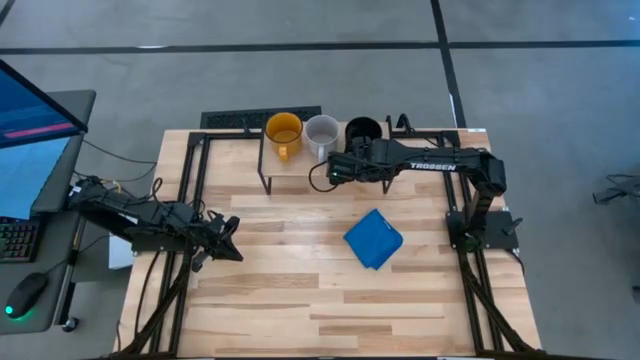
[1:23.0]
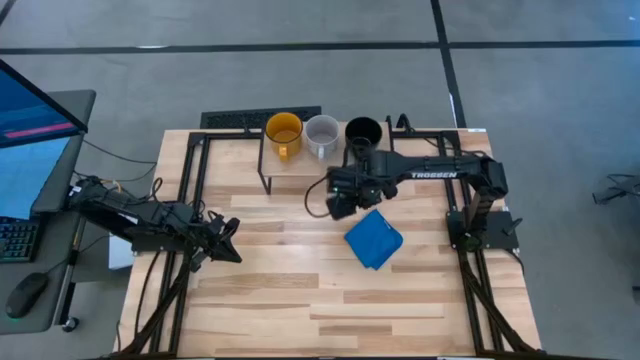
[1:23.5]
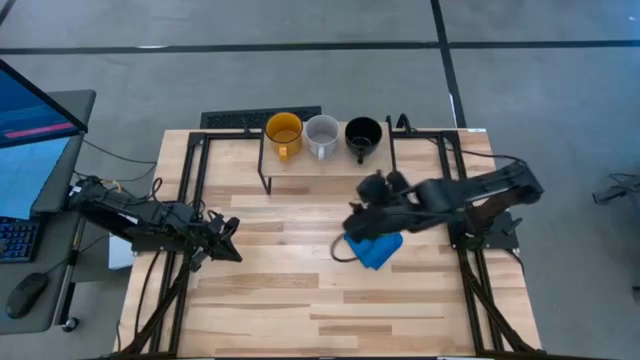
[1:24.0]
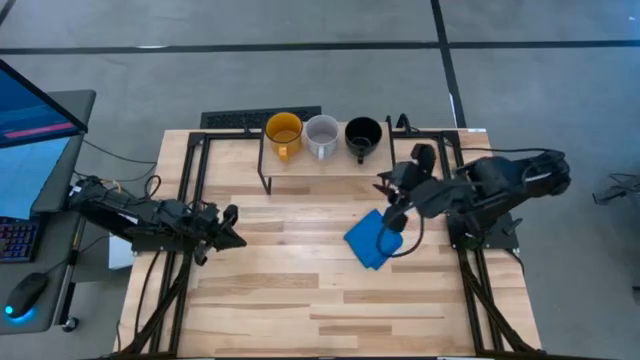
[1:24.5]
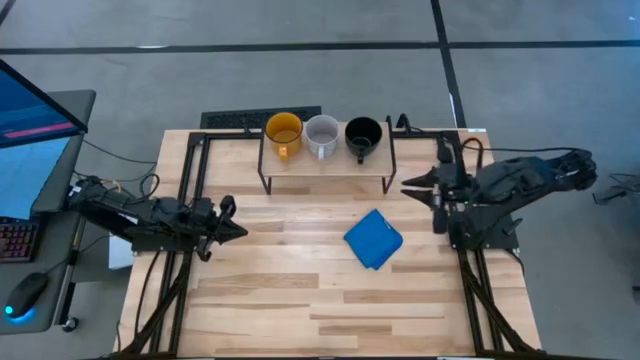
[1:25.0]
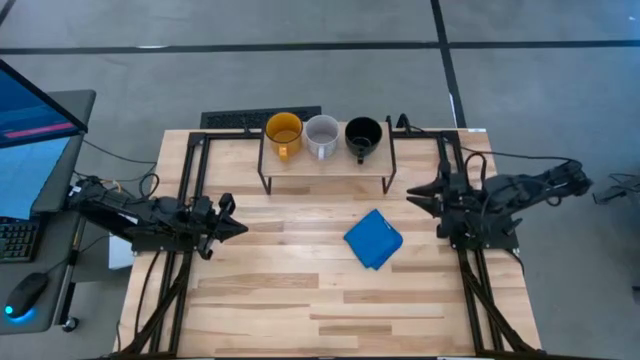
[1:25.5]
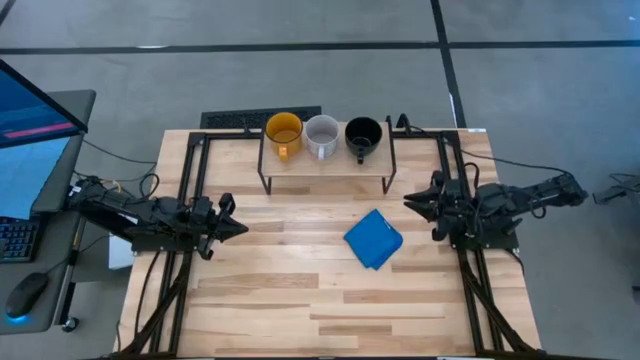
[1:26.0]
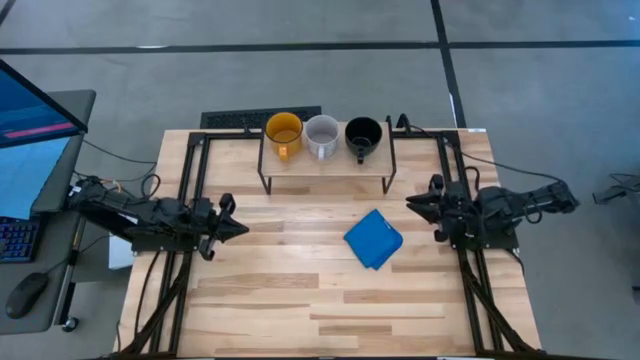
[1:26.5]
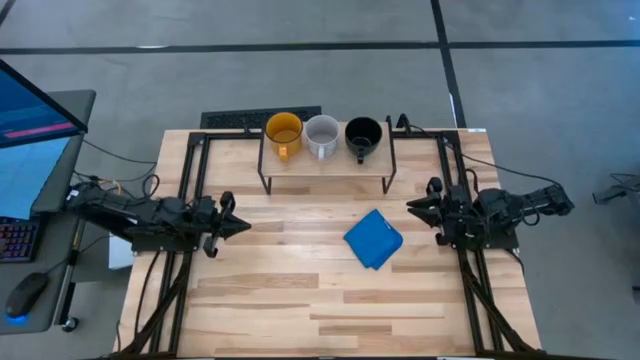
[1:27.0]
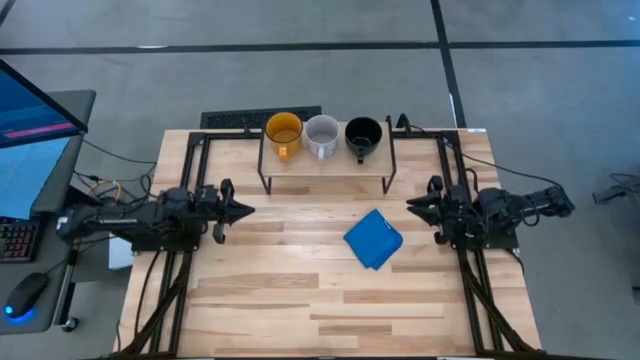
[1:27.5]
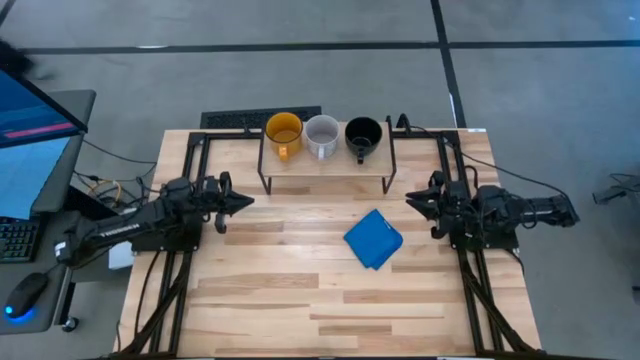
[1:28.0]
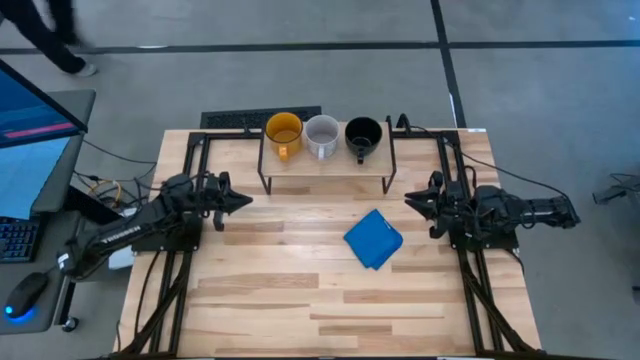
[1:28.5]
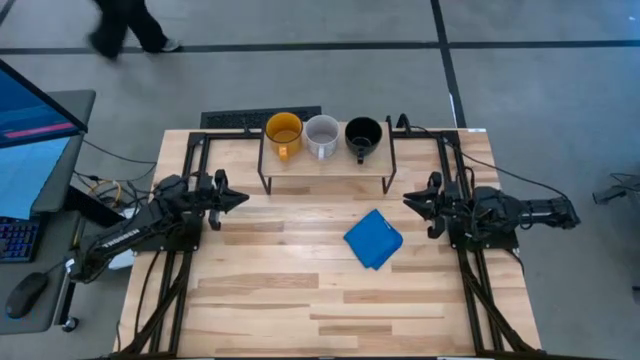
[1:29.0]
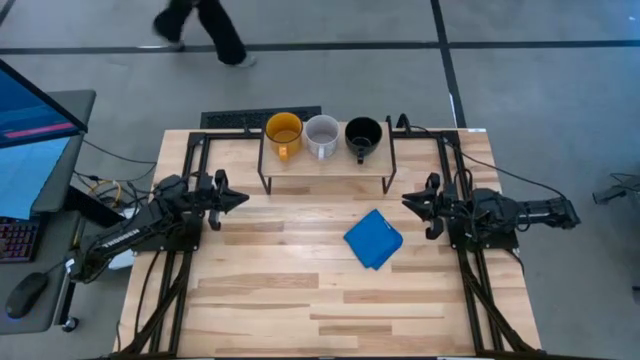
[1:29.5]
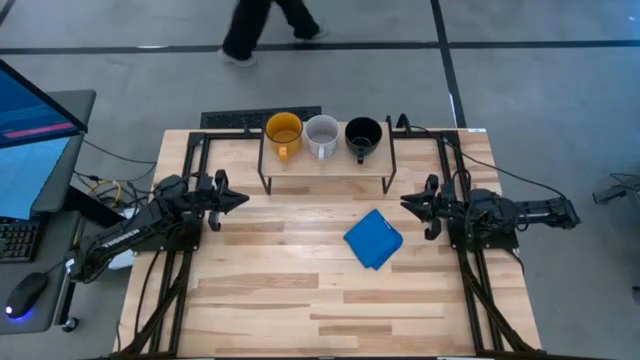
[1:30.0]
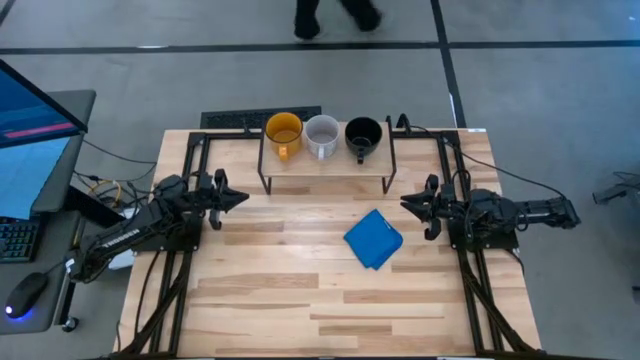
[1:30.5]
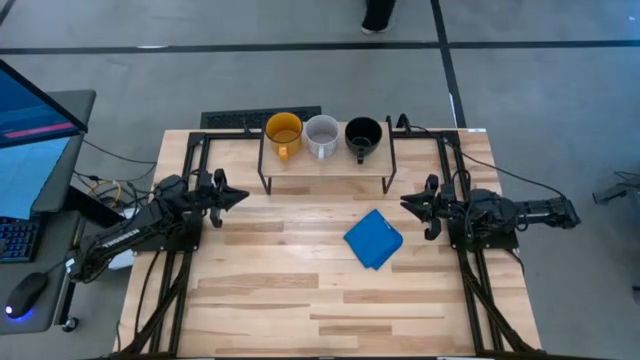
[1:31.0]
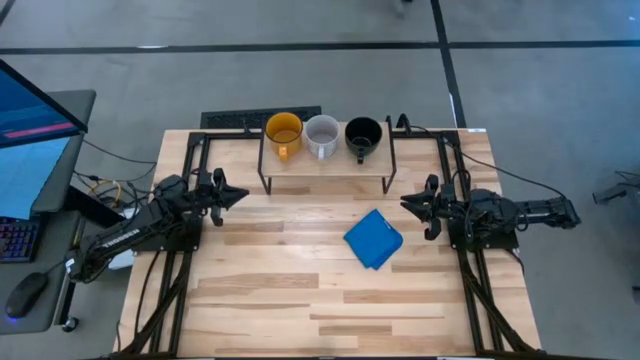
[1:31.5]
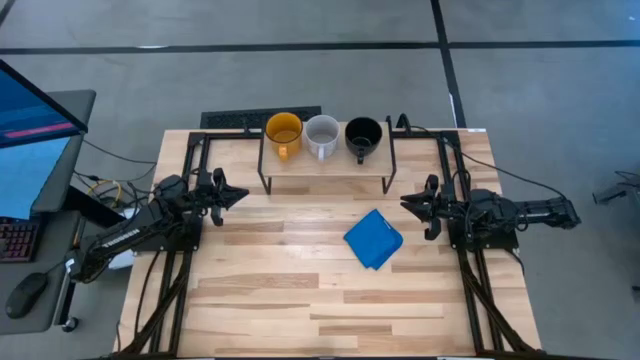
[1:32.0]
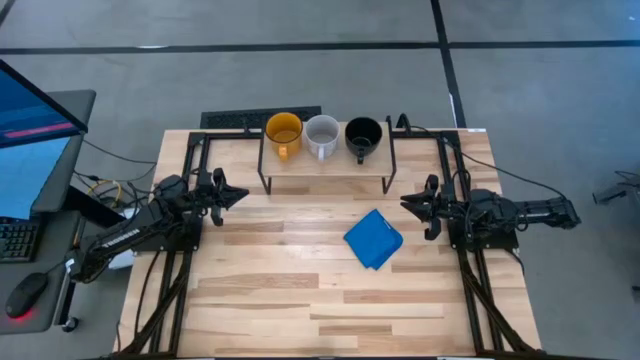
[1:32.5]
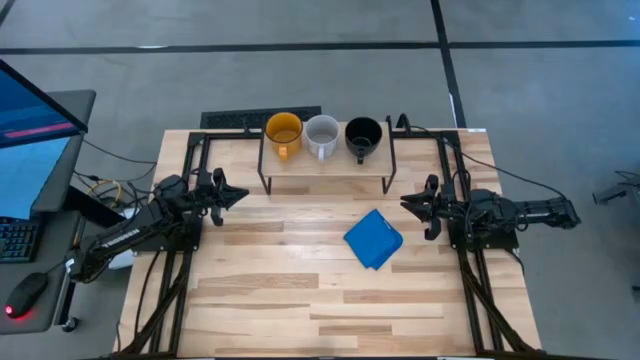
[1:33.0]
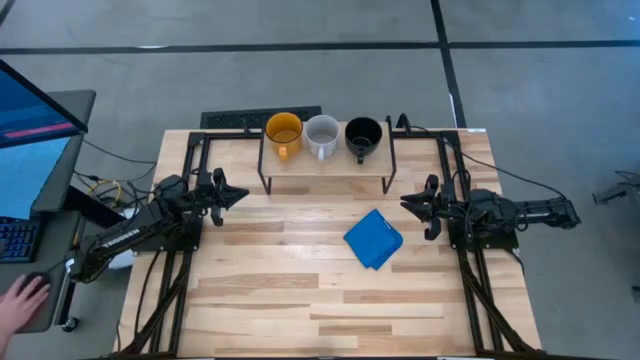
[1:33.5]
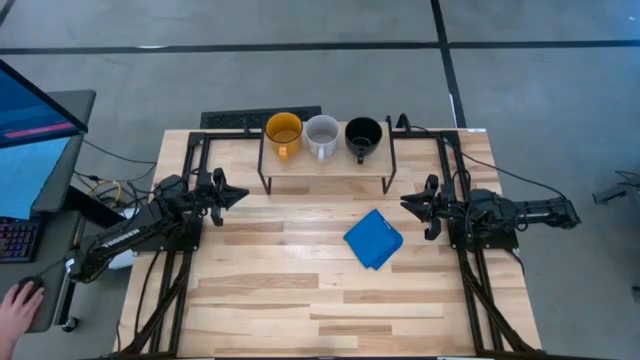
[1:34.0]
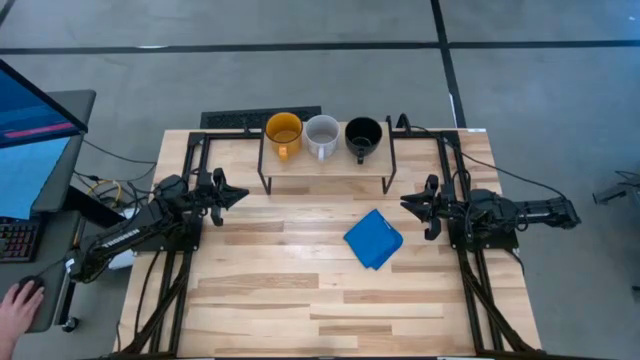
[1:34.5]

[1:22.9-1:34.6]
Task: Stack small to large cups/mugs on shelf
Return to Home Position

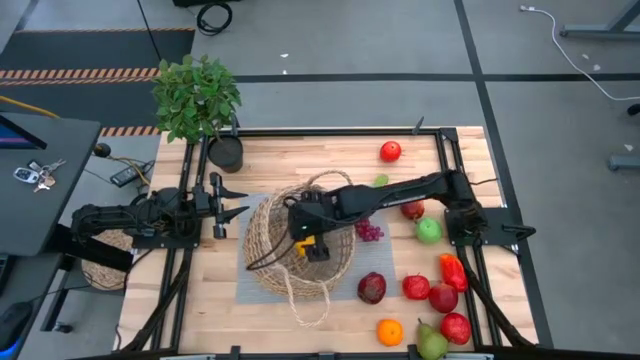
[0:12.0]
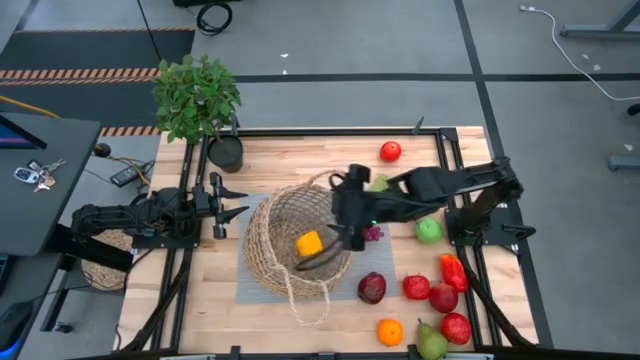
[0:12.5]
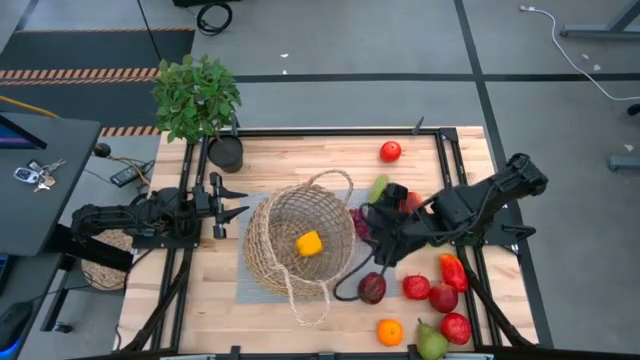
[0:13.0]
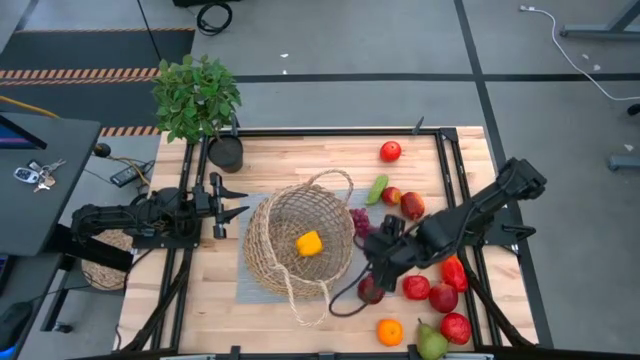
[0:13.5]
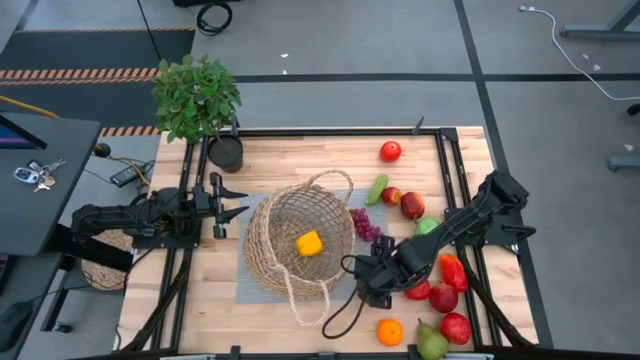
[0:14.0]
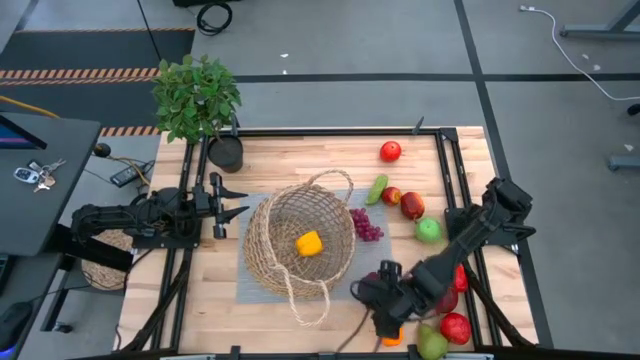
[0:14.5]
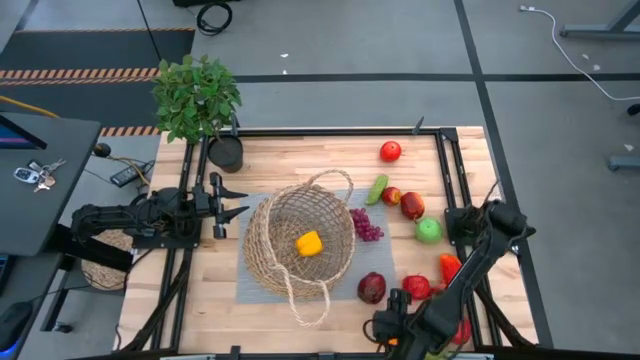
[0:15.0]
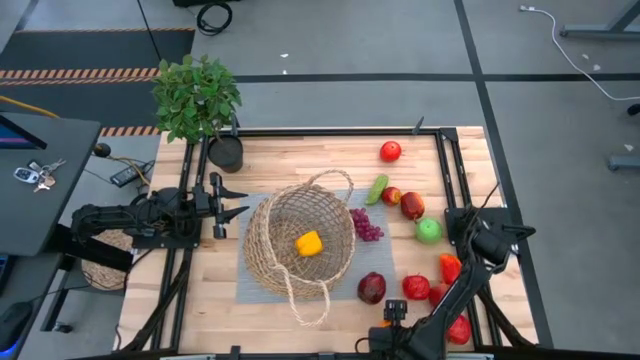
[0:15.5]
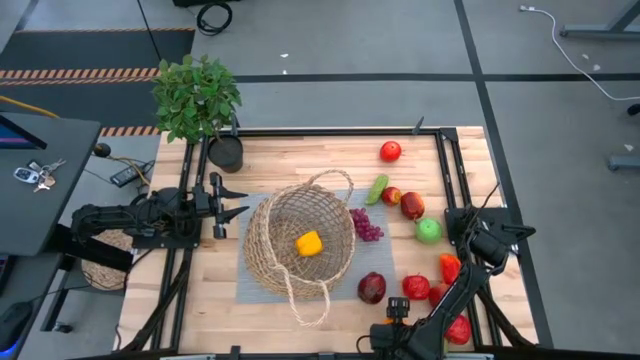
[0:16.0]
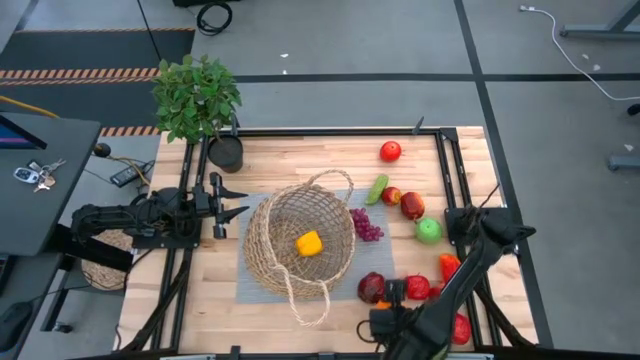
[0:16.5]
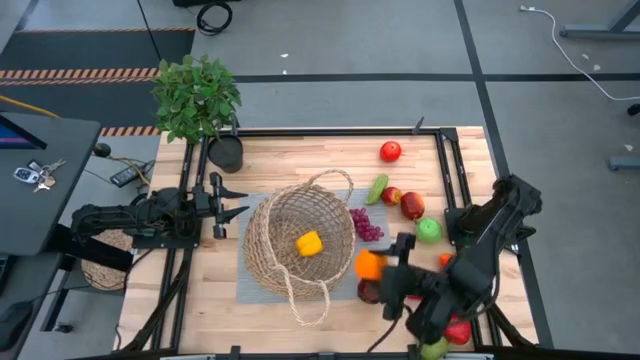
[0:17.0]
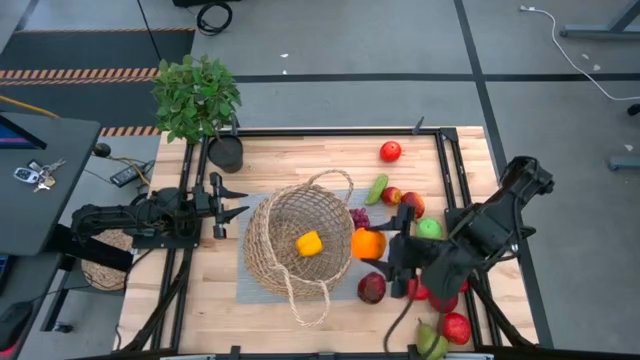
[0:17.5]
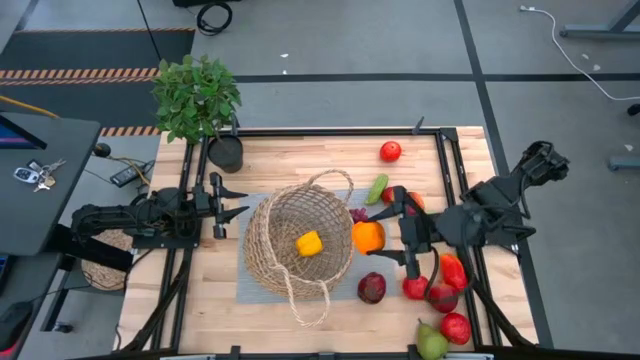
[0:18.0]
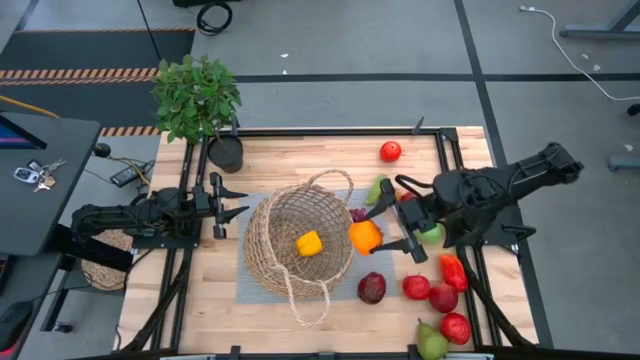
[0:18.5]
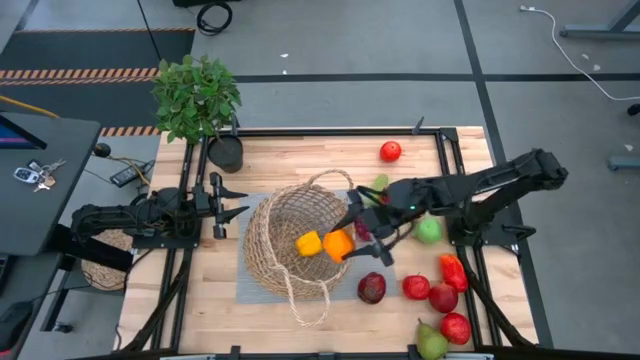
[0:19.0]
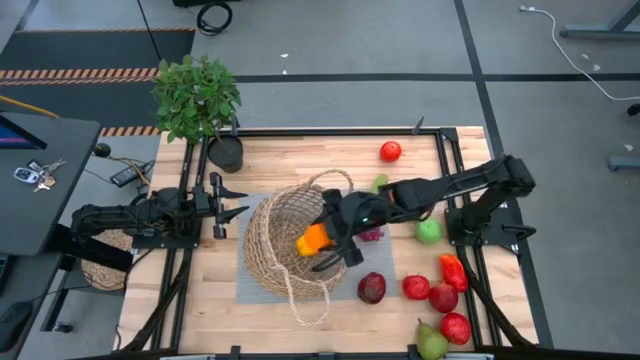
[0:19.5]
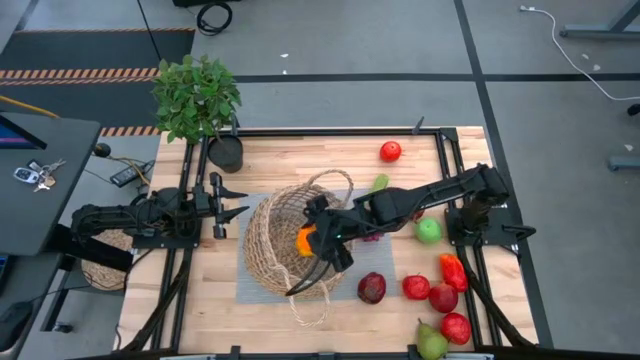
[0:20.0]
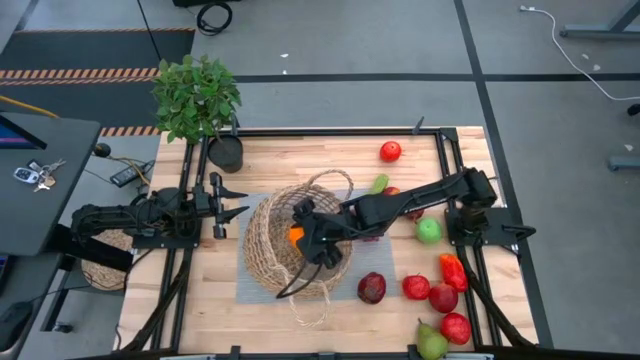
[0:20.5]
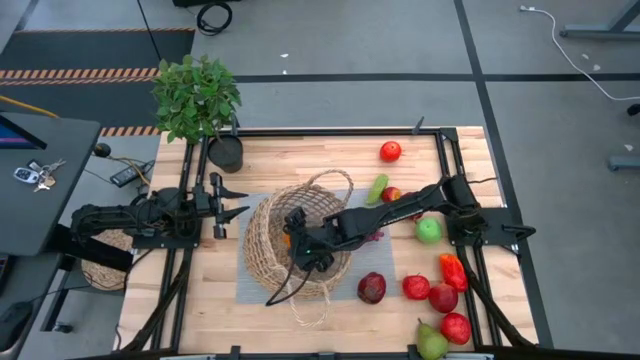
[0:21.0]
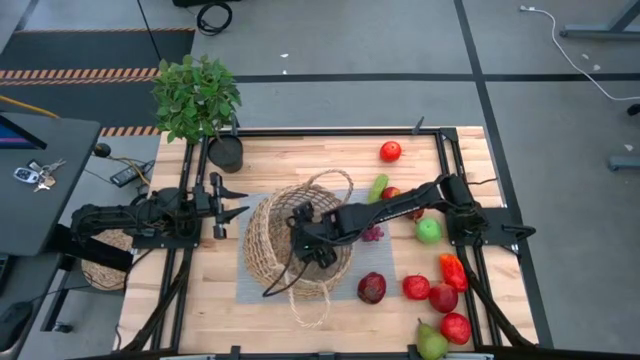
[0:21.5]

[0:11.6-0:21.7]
Task: Build produce basket
Put the orange in the basket
